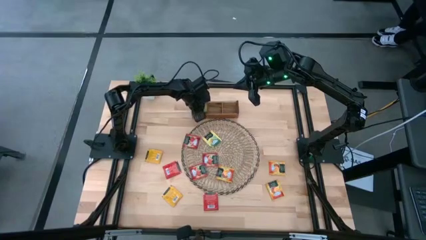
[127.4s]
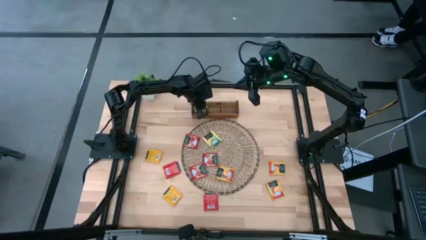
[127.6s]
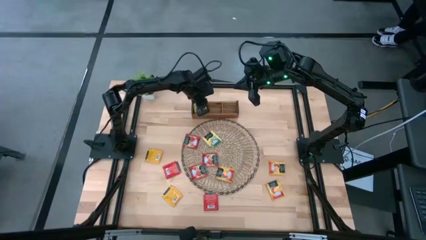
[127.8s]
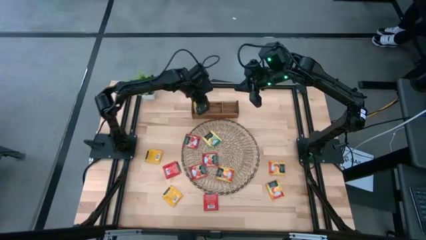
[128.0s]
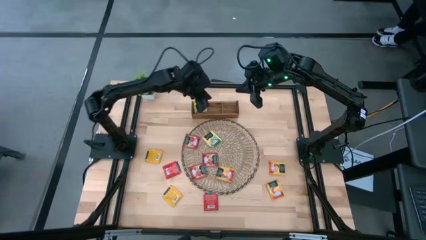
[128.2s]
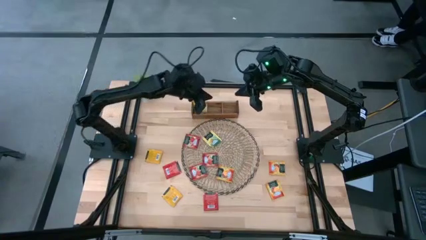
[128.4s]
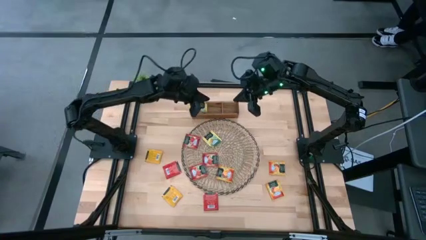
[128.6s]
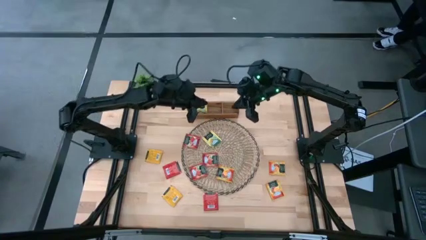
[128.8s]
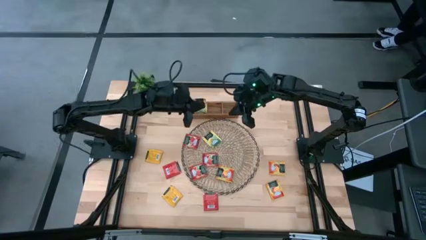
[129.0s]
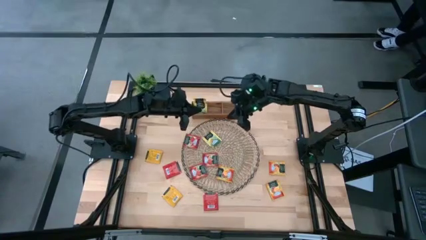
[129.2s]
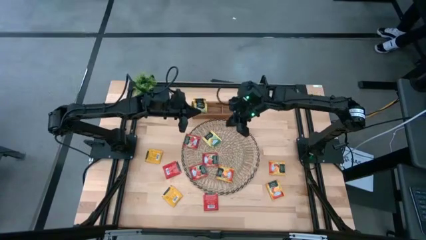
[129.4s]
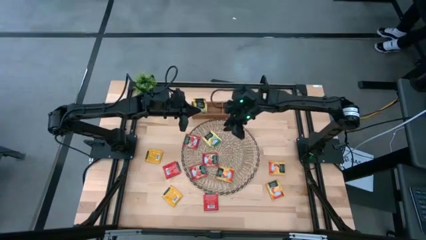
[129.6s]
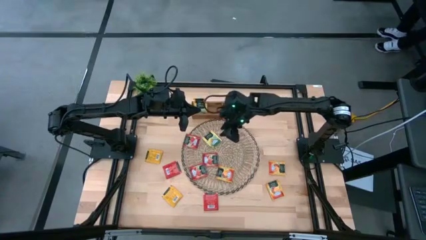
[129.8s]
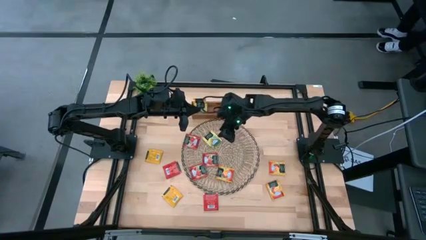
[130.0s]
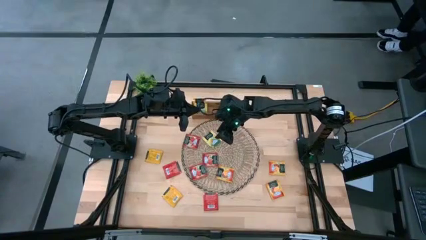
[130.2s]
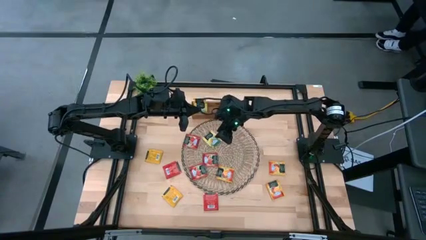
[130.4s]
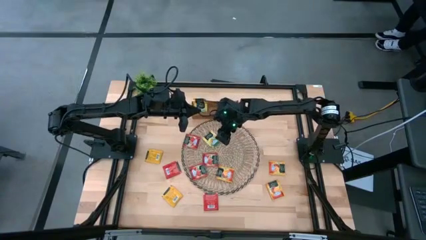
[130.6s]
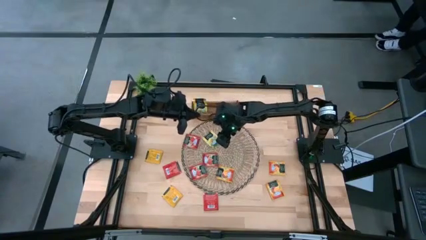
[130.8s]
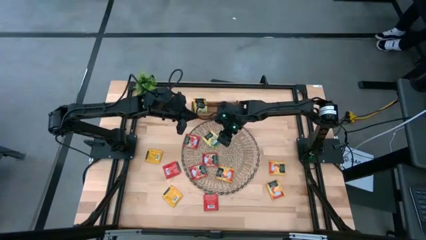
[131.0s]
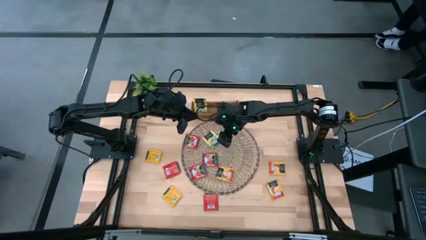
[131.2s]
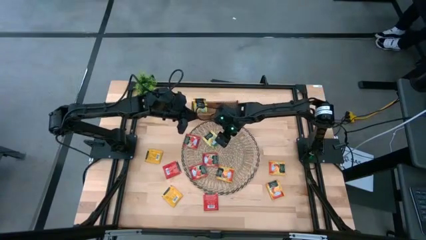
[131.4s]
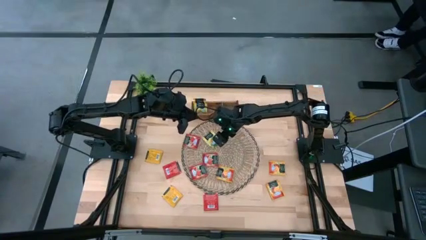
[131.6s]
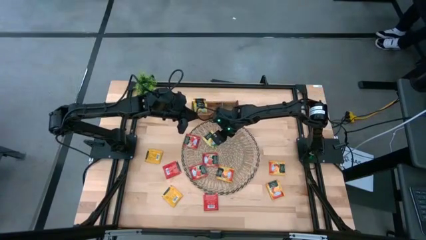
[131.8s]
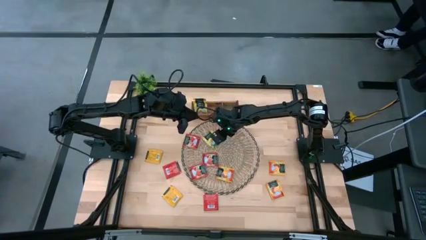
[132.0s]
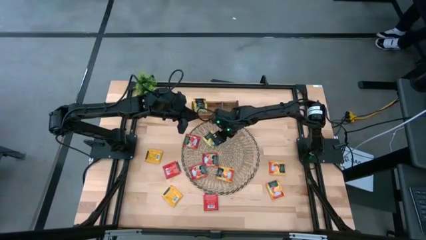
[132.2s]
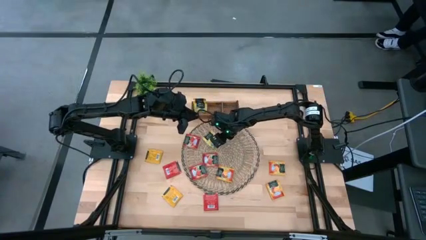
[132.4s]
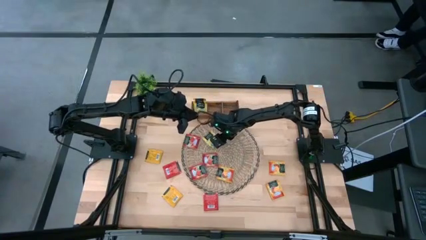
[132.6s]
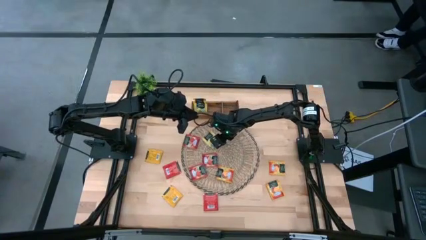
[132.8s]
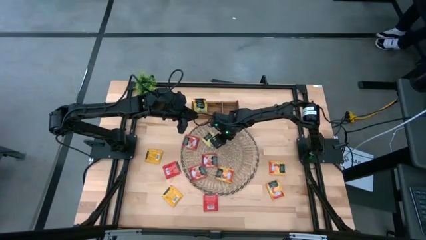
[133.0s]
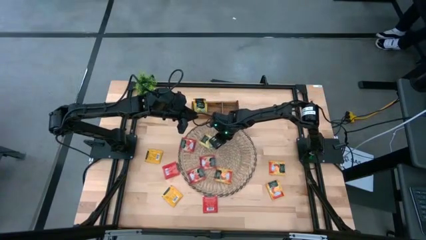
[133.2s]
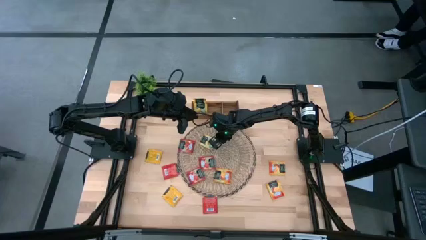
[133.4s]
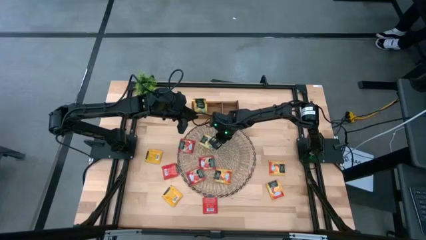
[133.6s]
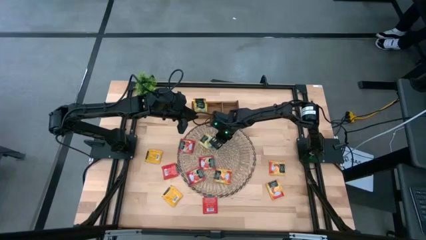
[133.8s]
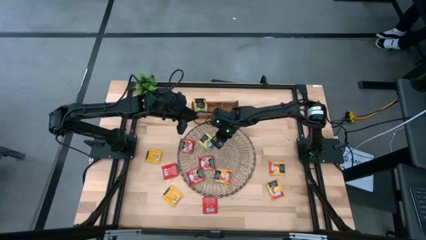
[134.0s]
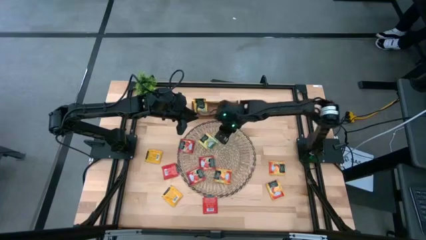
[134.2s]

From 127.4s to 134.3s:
Task: Pick & Place Tea
Put the yellow tea bag into the left of the wooden organizer

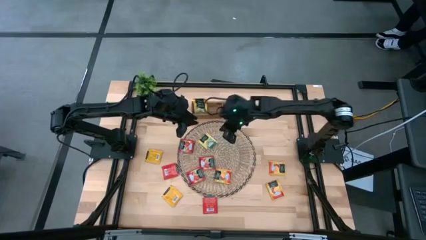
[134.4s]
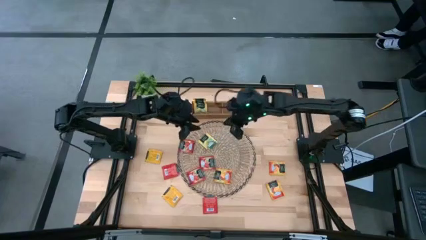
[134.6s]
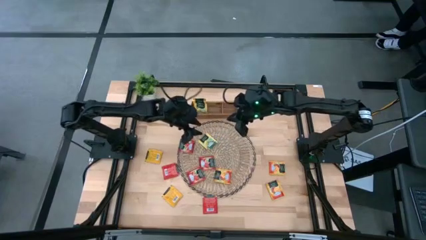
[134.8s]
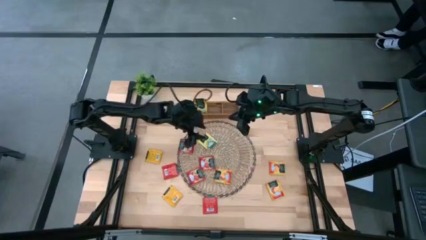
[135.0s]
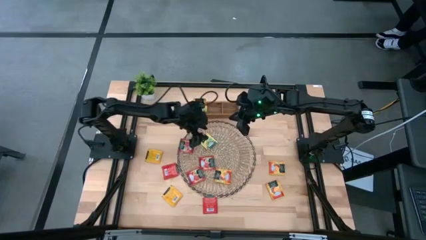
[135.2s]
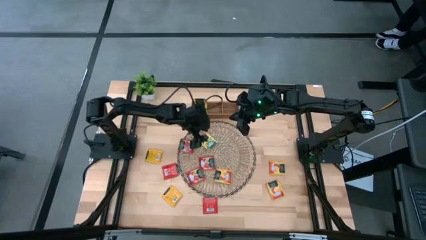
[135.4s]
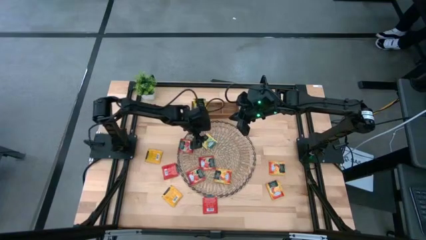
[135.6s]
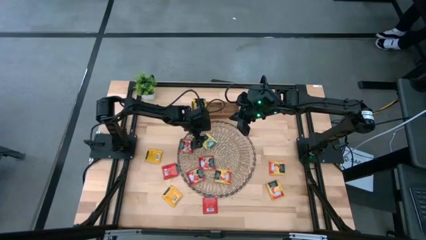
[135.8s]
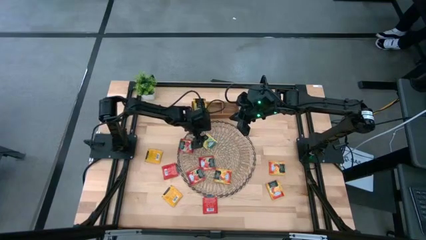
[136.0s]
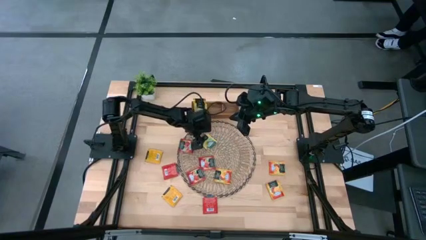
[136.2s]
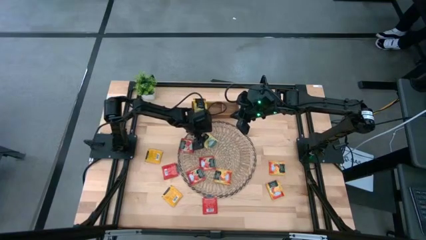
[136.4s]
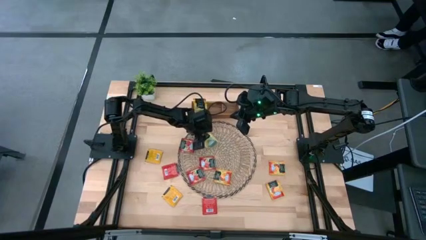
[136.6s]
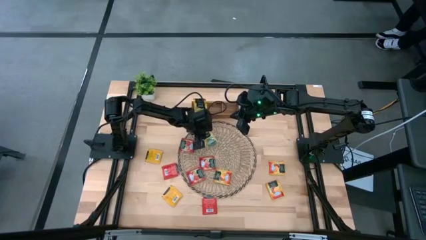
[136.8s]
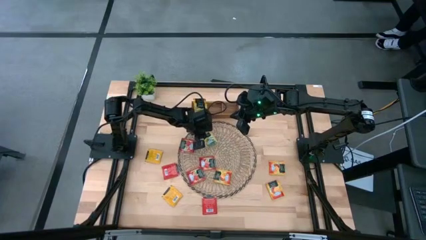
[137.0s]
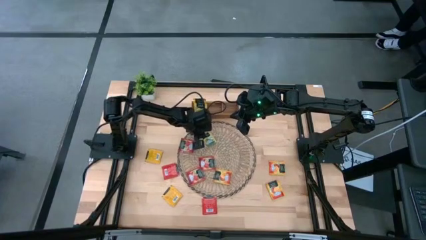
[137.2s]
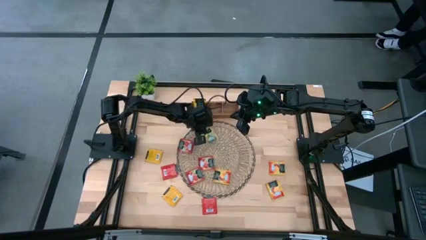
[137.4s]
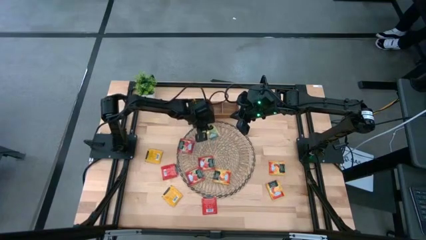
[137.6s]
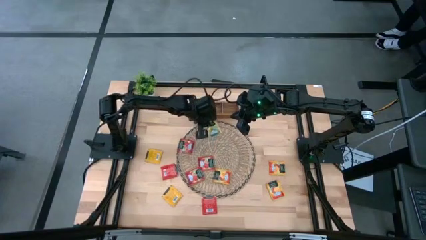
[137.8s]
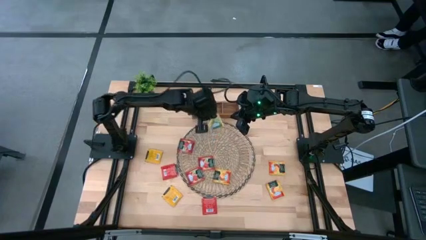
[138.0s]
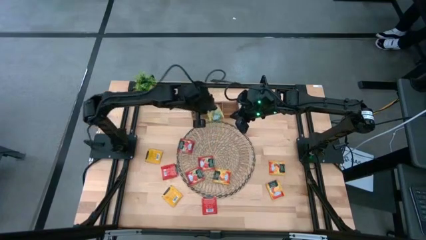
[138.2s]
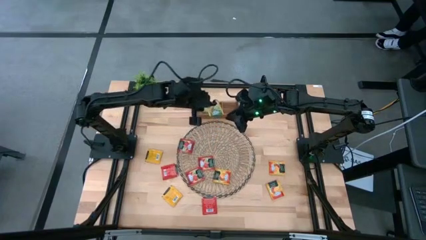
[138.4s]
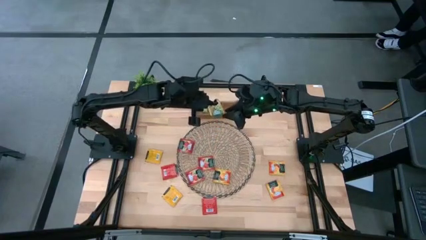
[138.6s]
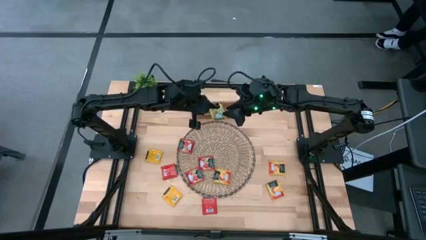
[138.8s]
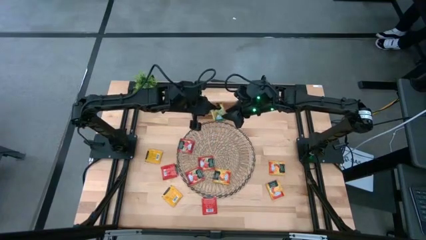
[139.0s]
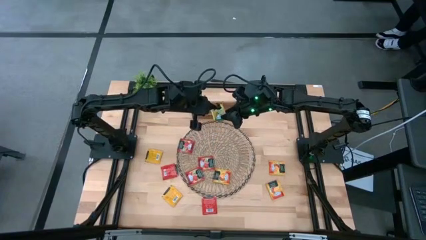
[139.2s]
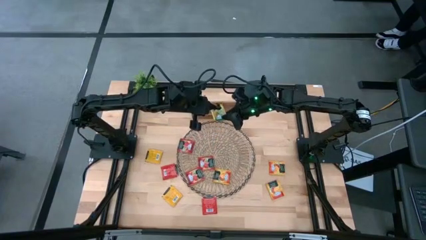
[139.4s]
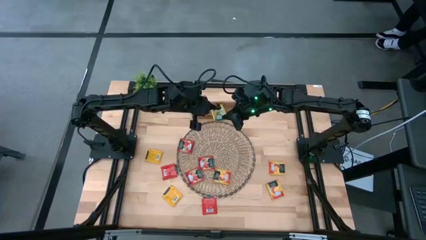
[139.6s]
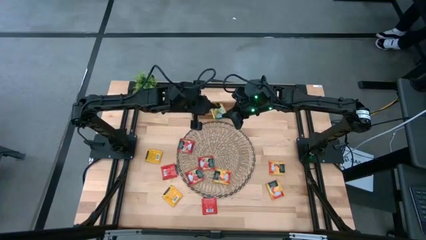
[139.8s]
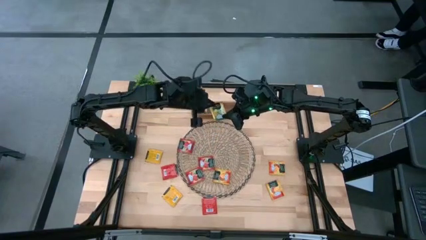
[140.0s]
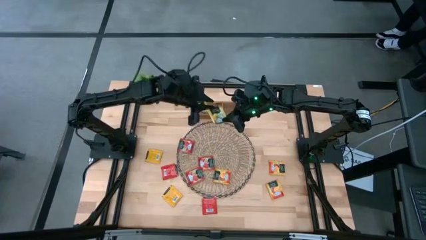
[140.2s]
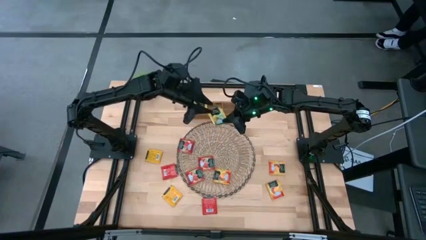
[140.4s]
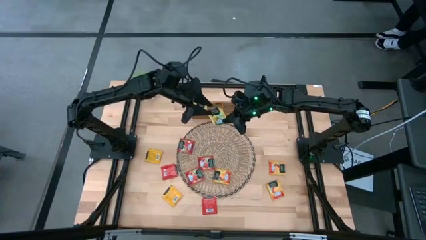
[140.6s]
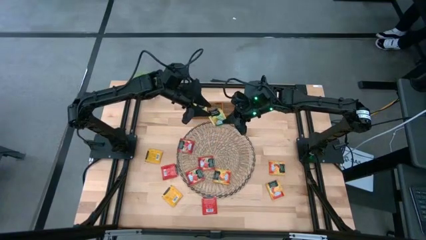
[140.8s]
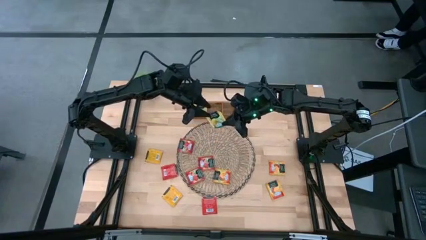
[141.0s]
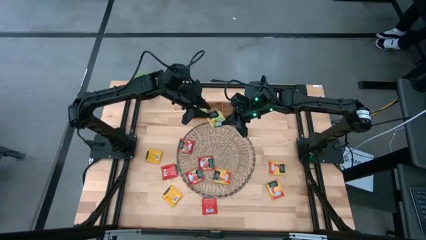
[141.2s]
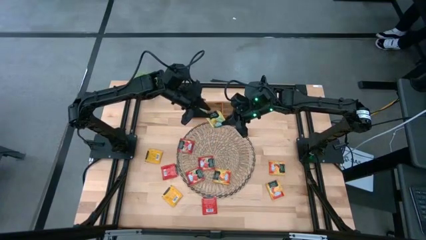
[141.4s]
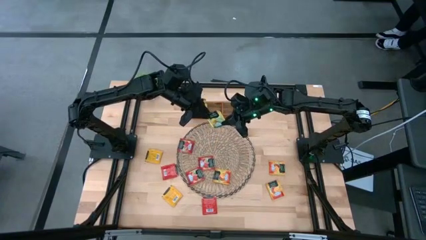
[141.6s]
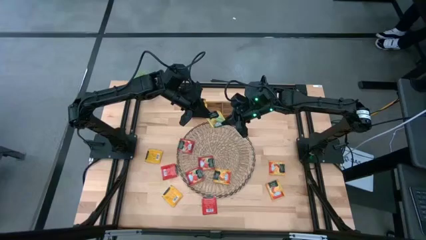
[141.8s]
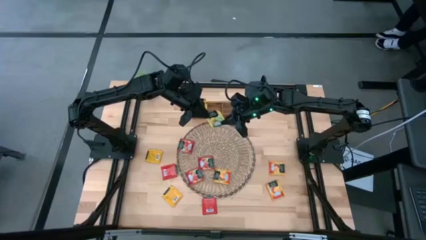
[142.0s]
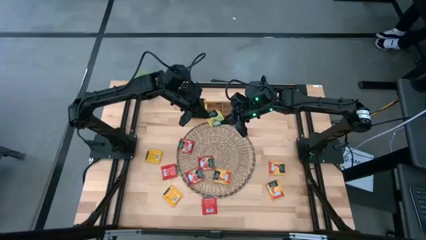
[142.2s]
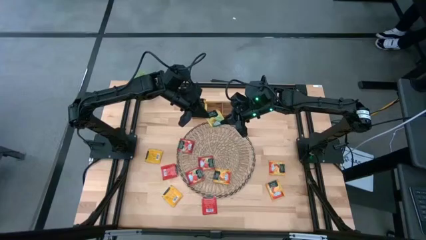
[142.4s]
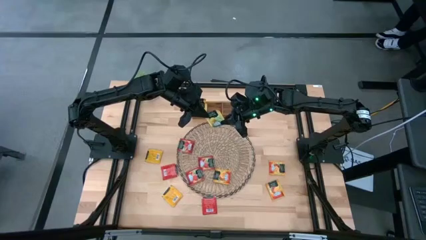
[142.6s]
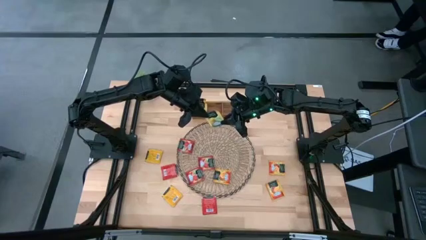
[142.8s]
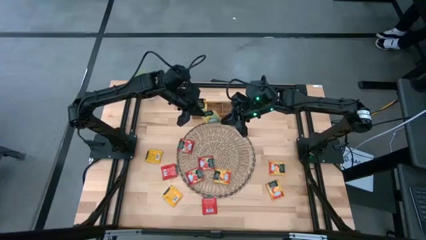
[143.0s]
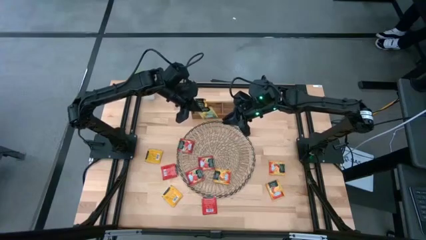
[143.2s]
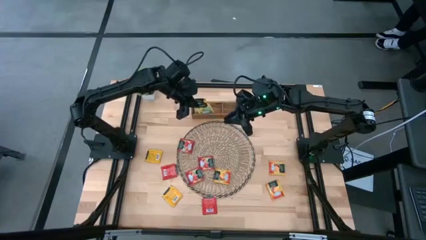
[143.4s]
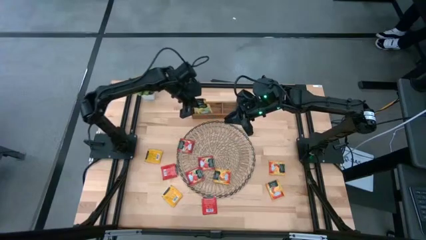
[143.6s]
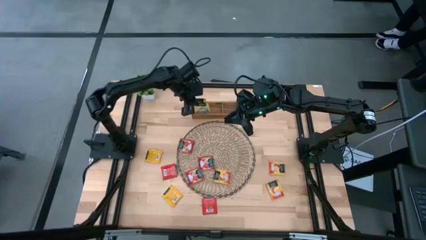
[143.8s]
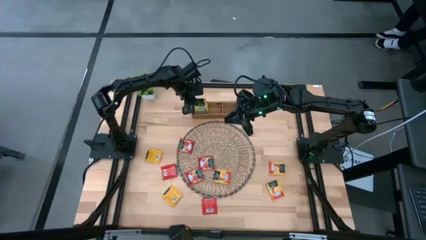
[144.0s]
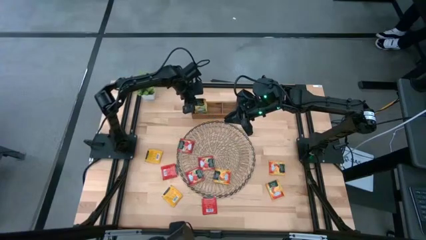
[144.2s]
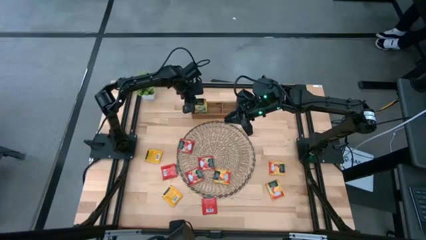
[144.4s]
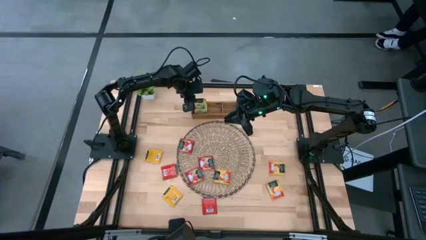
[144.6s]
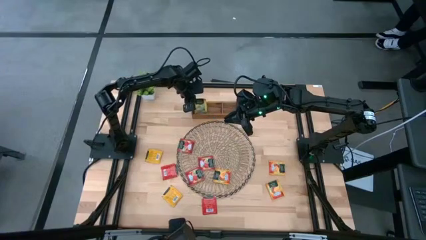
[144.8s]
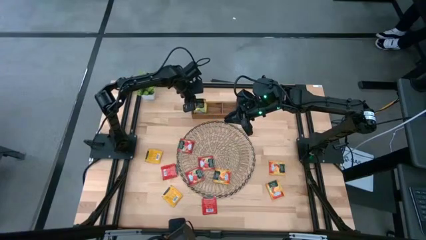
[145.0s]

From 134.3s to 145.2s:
Put the yellow tea bag into the left of the wooden organizer
